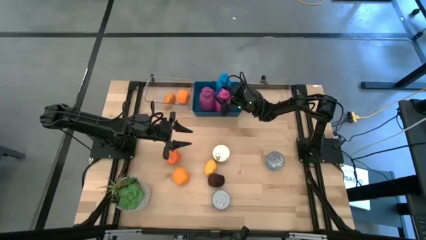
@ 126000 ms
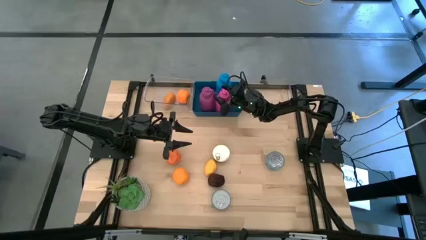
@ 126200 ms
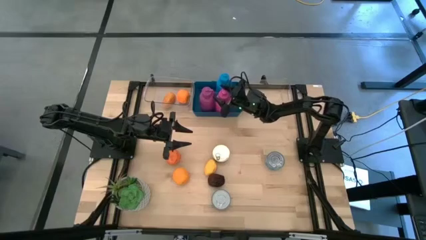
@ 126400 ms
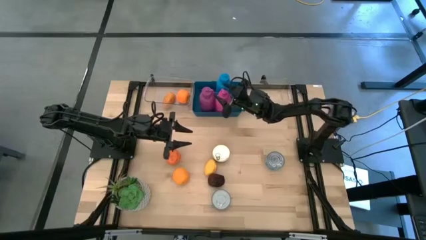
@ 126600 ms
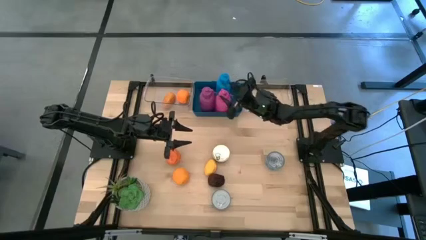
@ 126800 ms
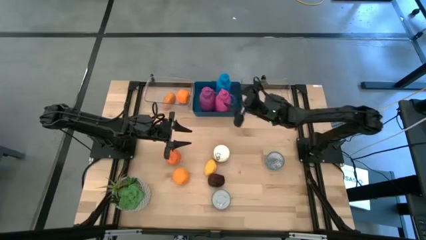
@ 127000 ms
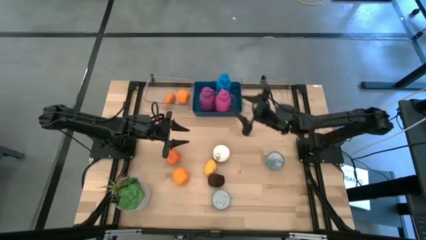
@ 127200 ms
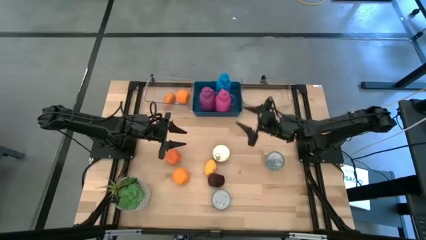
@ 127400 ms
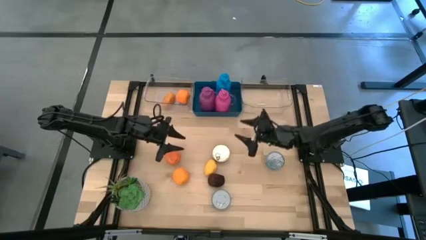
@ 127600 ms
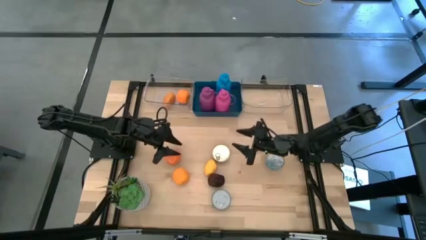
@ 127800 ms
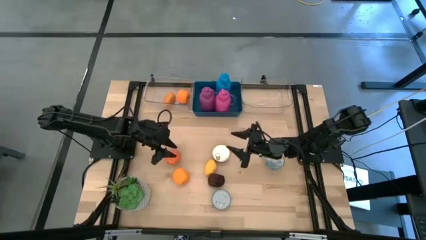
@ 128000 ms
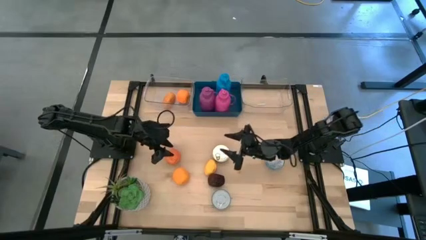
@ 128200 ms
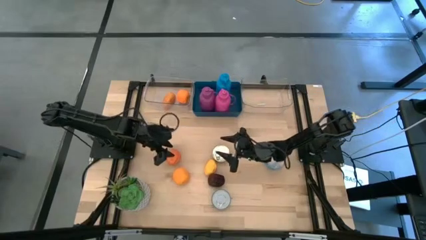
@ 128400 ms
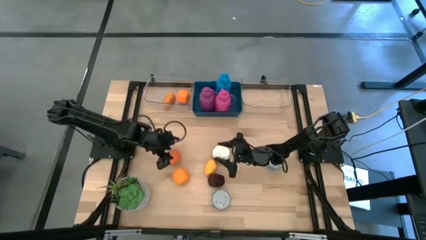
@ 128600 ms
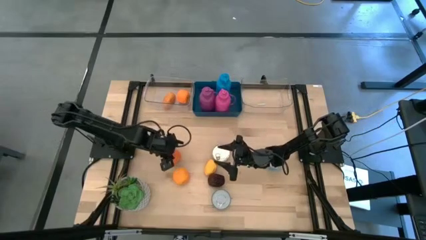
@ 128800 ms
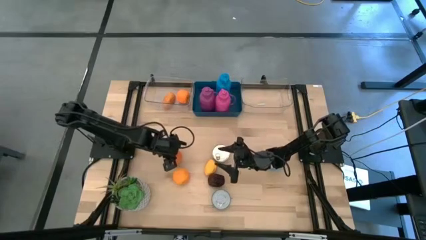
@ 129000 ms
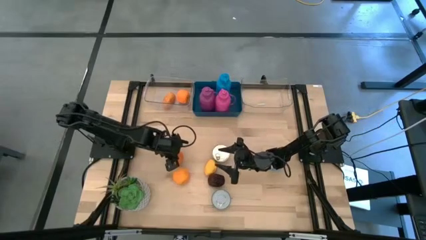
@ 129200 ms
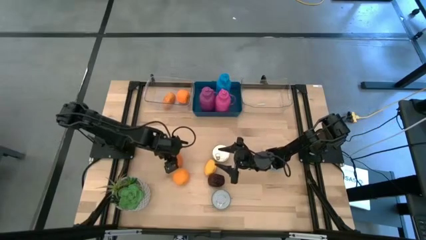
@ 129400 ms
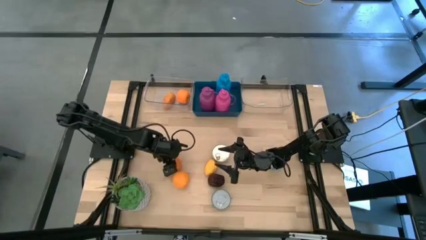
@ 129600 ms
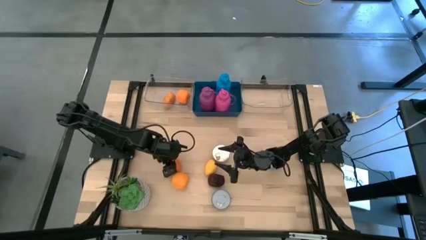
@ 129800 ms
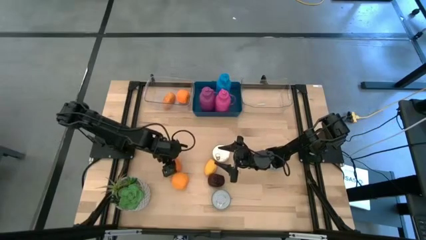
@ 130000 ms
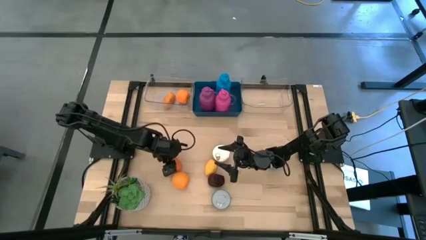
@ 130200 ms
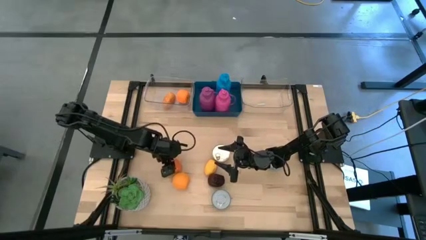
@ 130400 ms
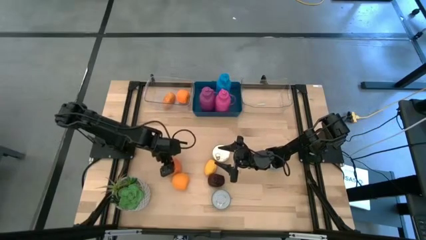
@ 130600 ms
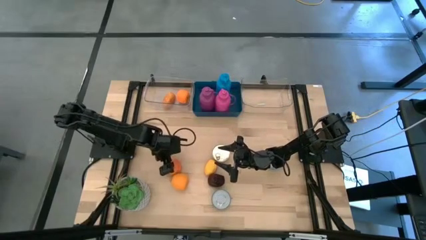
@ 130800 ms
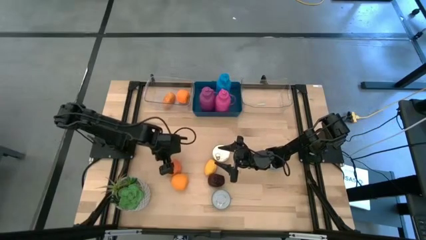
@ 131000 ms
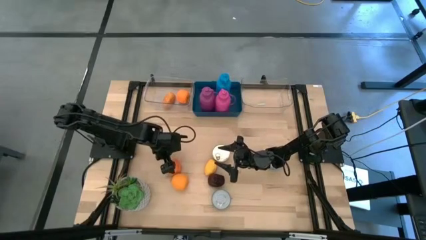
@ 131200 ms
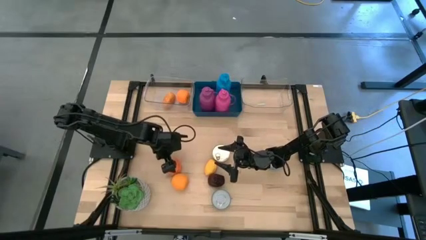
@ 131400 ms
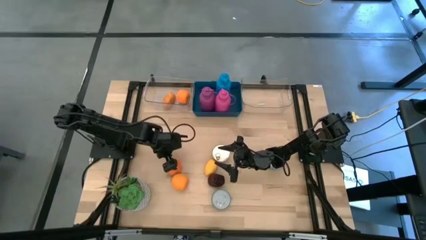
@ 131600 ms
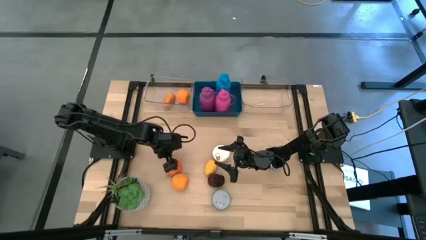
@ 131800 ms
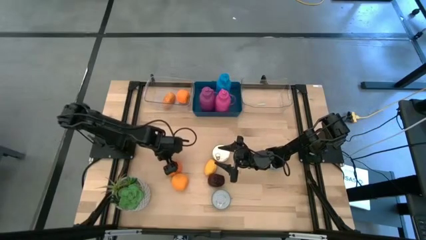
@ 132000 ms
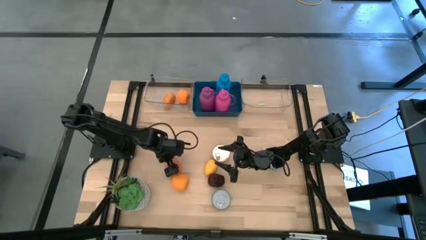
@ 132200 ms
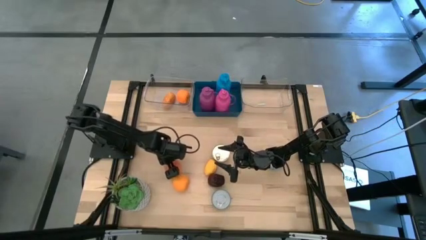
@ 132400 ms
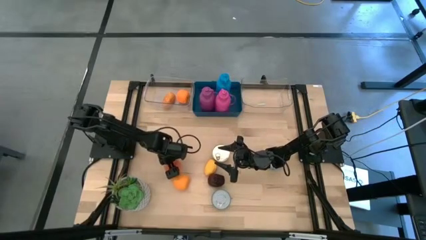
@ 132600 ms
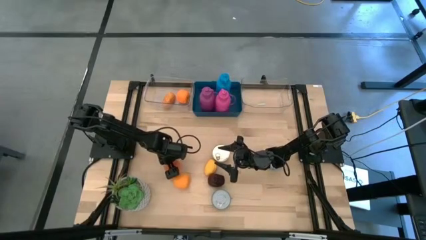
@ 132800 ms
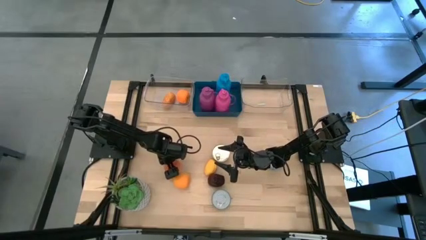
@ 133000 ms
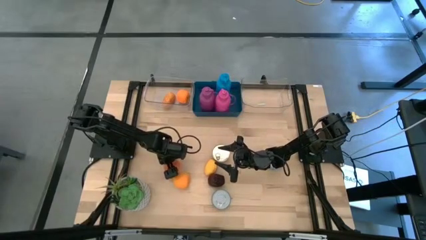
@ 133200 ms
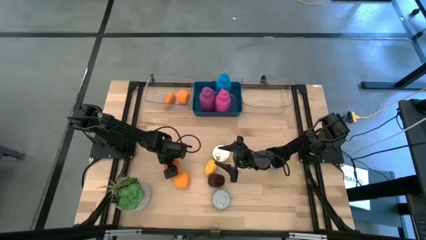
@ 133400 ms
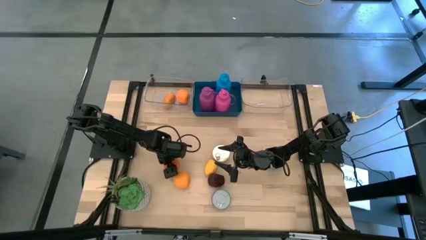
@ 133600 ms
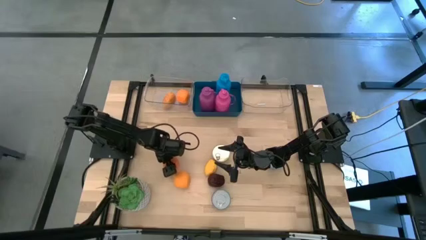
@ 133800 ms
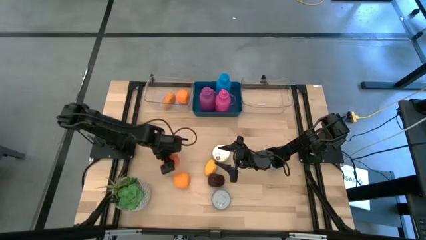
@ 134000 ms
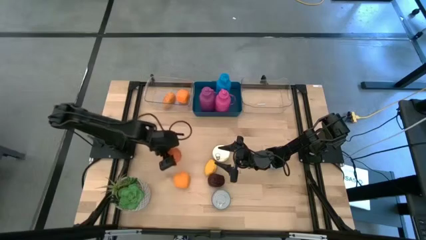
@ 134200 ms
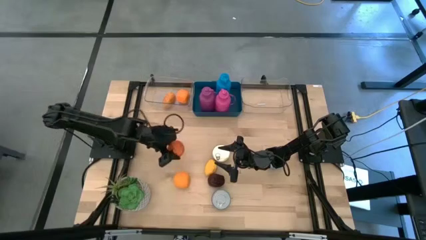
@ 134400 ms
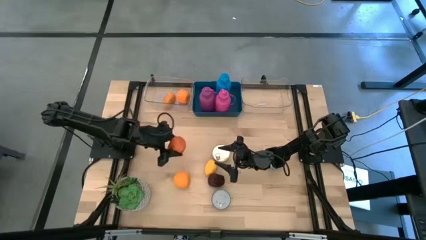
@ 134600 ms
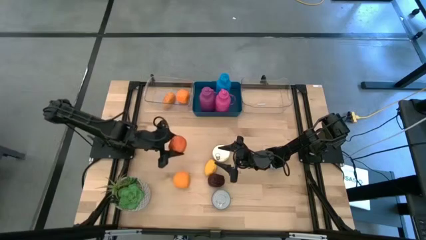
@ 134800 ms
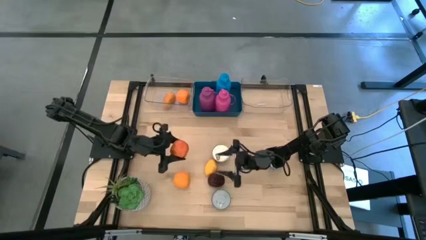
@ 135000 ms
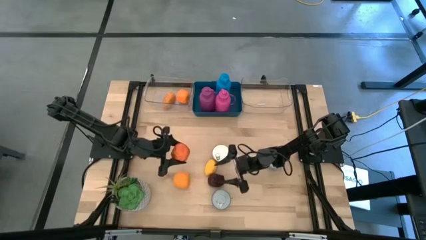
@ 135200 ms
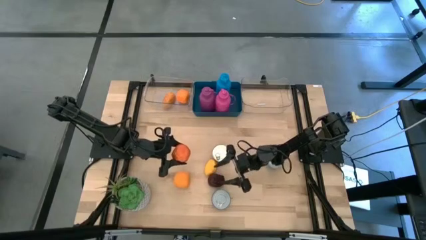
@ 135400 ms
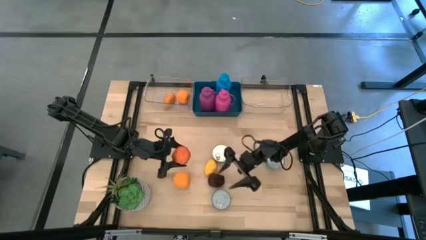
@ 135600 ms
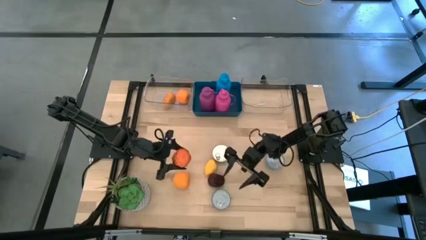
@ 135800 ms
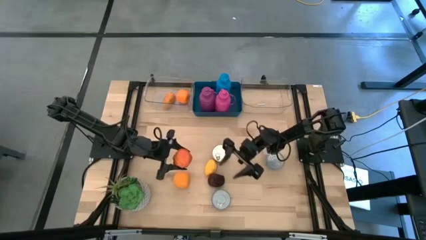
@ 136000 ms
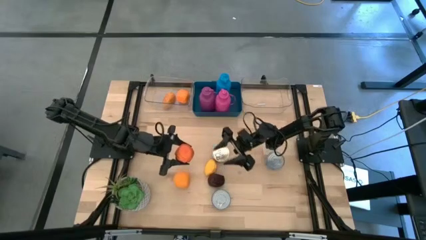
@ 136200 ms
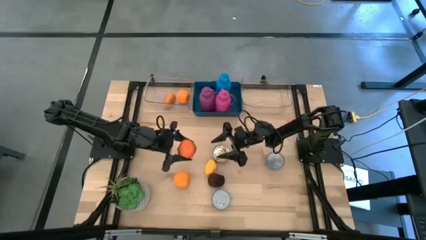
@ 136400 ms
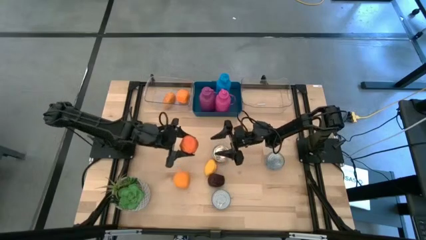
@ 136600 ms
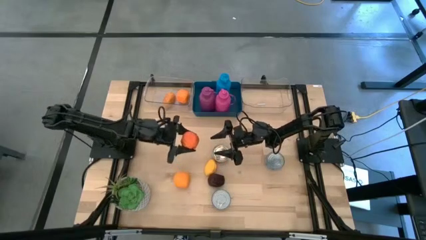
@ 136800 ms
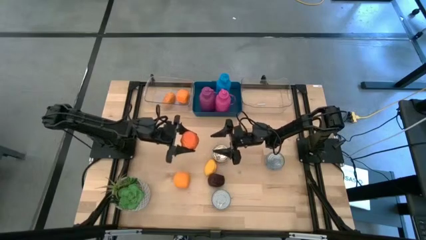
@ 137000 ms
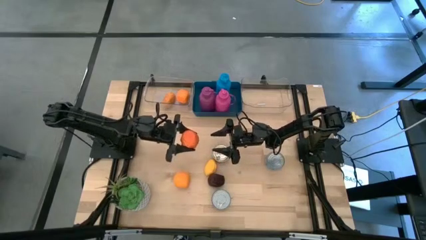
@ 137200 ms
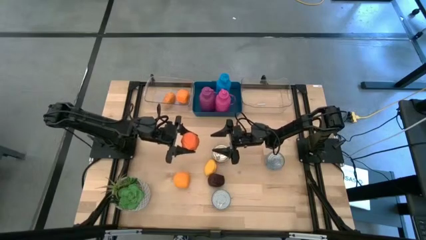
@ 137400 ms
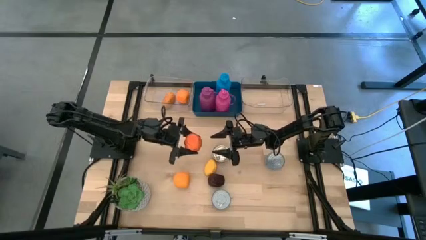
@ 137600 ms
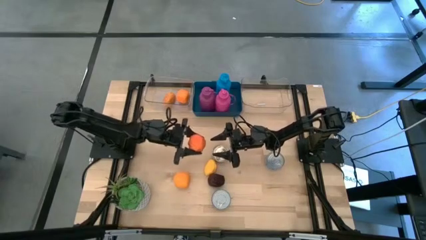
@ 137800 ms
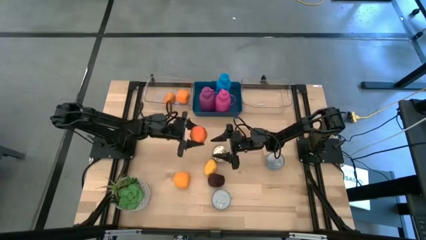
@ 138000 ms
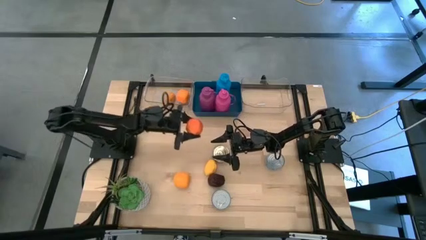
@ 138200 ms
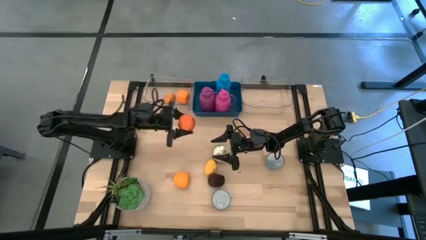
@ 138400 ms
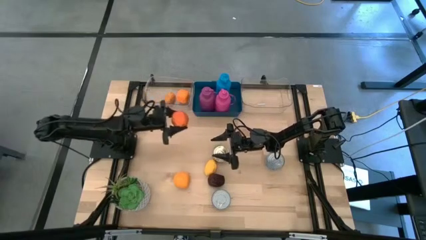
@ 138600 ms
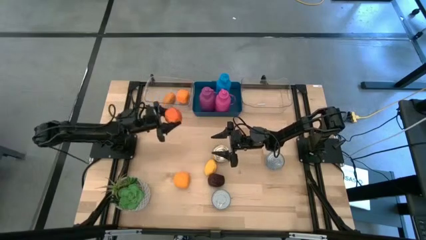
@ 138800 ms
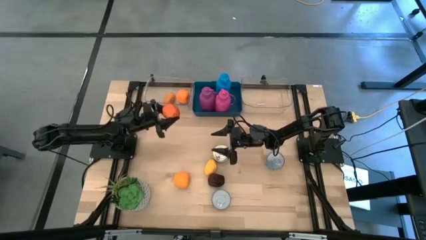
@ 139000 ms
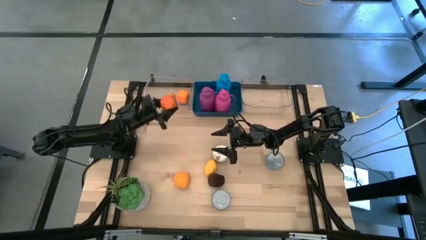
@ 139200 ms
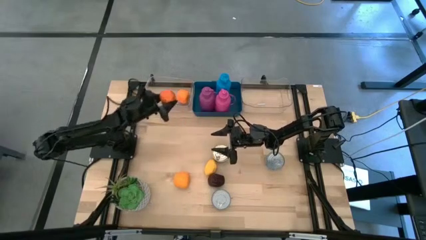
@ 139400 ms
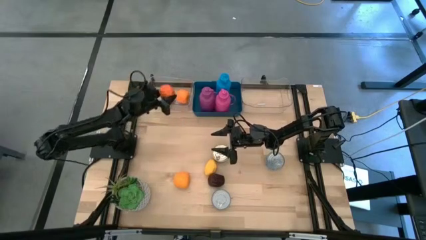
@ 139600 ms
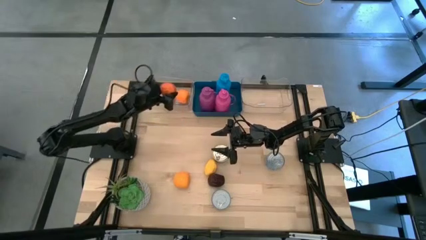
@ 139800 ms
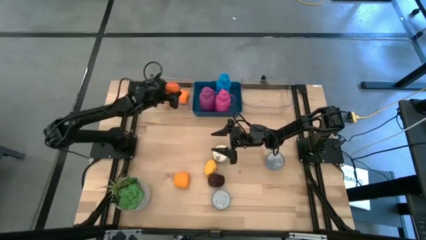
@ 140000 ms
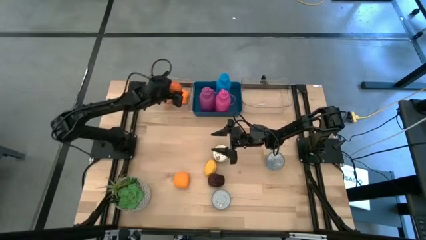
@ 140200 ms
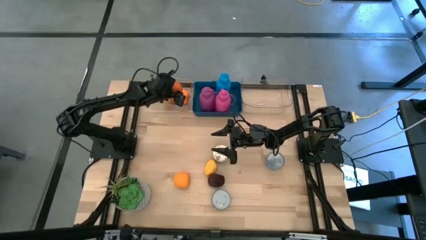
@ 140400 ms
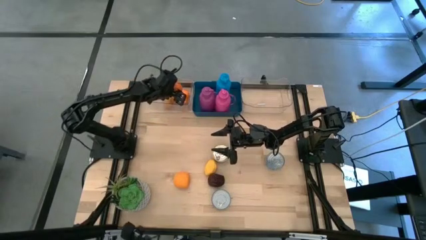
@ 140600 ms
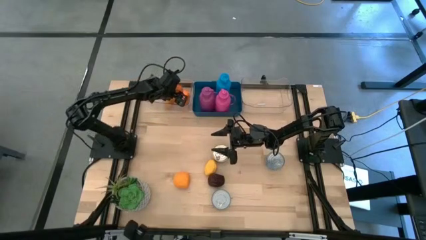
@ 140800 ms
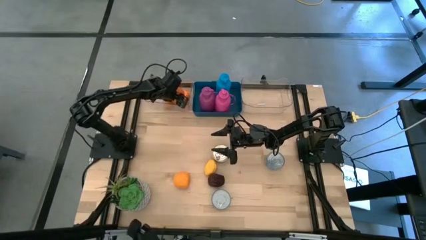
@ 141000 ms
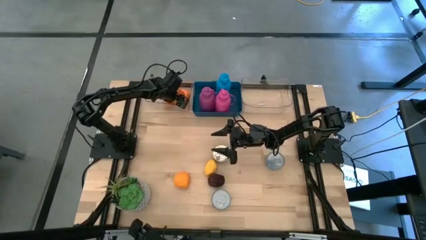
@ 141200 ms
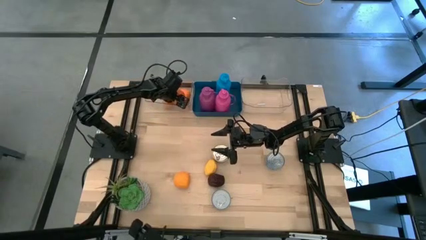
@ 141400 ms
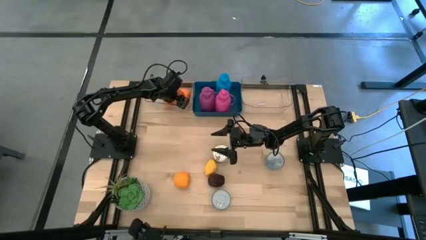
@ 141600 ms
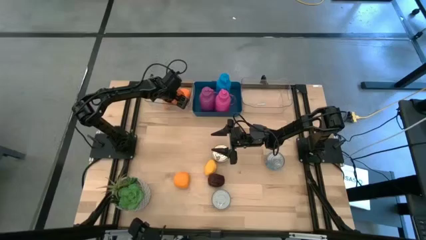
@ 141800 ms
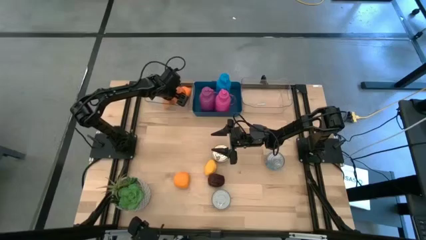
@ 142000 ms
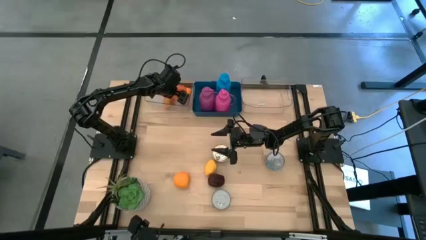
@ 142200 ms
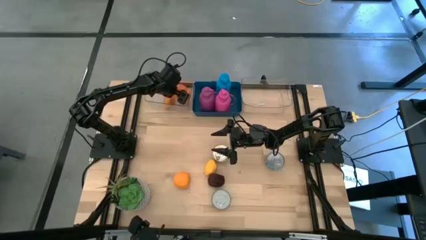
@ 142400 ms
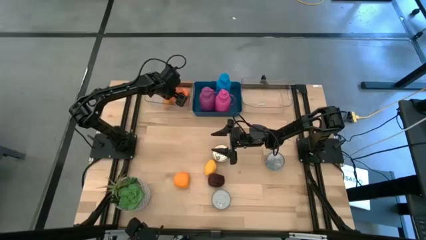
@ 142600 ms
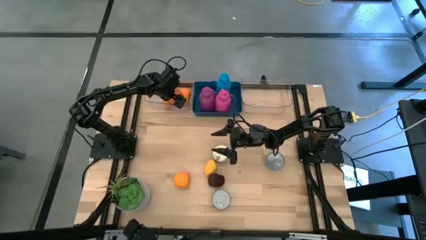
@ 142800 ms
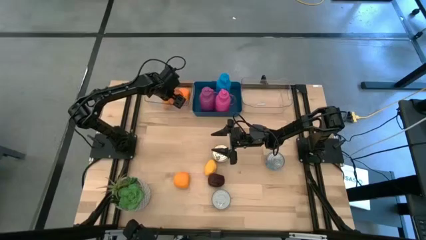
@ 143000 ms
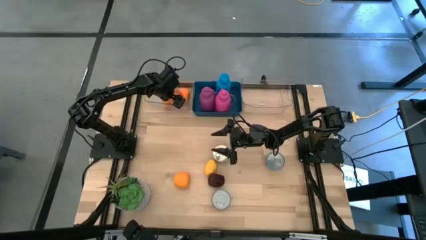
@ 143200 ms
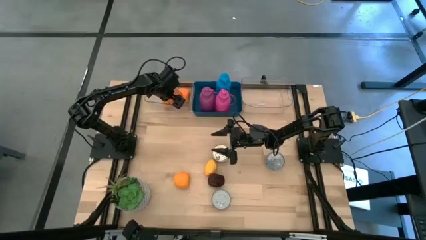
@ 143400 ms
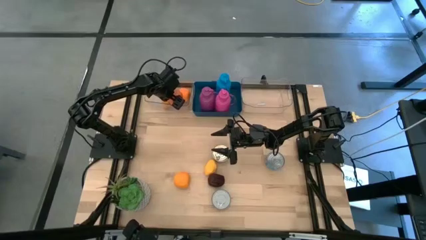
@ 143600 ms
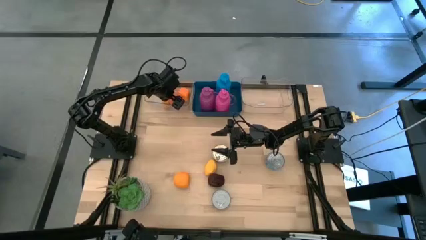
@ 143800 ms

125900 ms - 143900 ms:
Task: Pick & Place Food Item
Put the top orange into the left transparent bin
